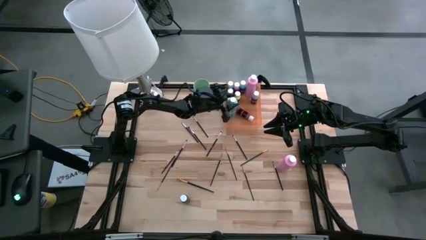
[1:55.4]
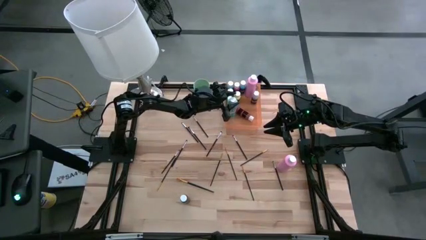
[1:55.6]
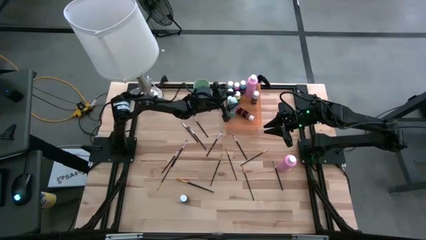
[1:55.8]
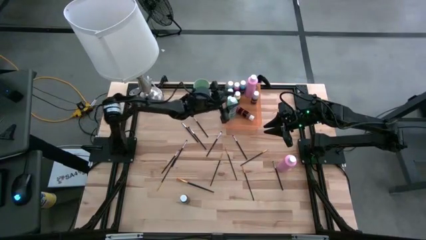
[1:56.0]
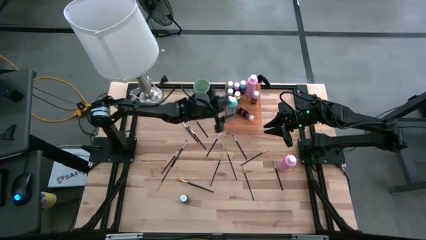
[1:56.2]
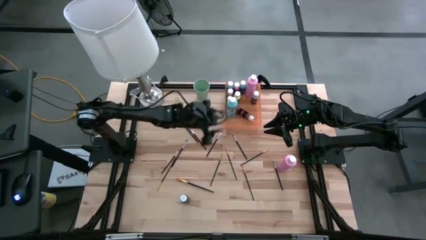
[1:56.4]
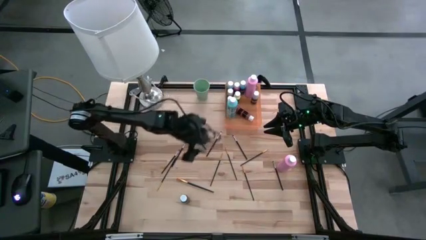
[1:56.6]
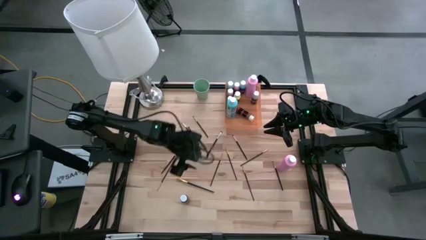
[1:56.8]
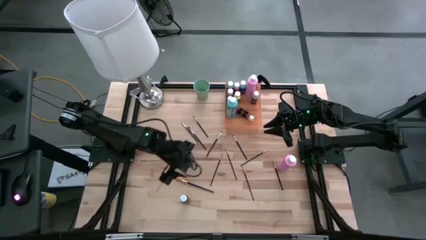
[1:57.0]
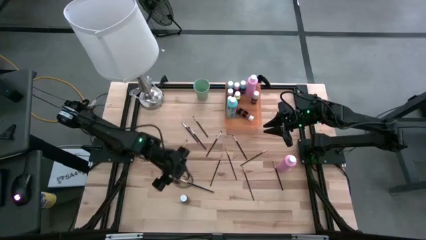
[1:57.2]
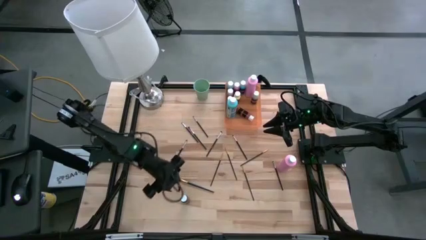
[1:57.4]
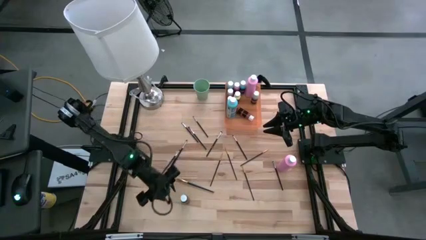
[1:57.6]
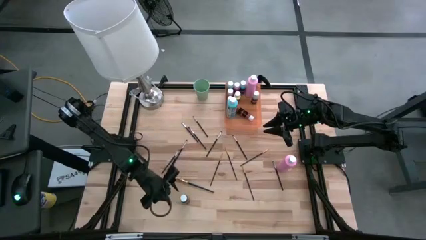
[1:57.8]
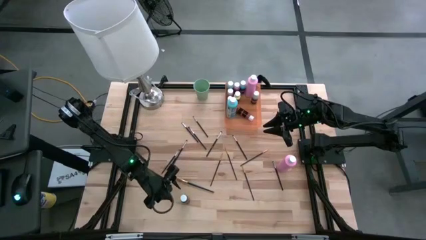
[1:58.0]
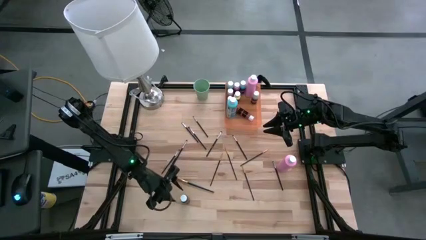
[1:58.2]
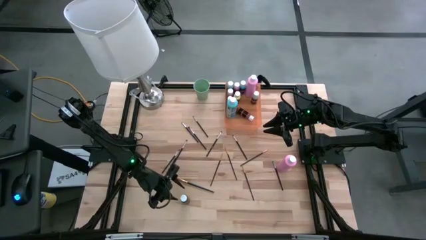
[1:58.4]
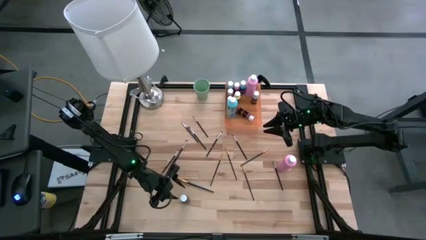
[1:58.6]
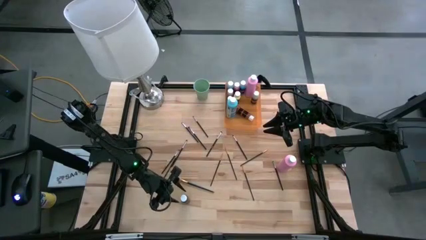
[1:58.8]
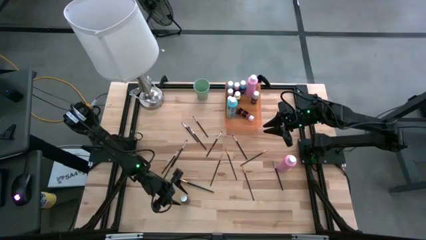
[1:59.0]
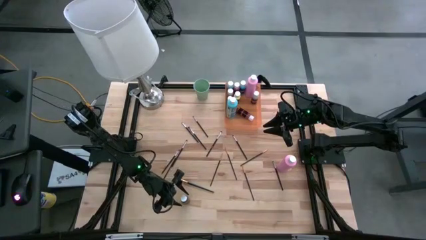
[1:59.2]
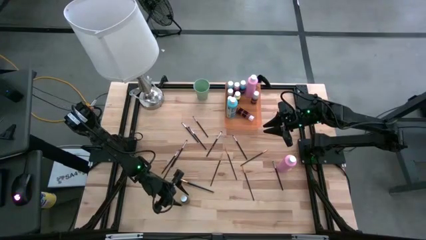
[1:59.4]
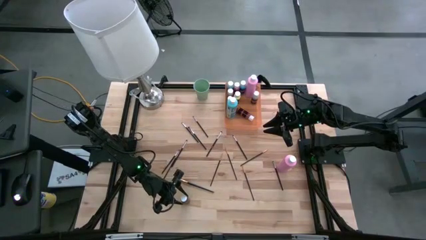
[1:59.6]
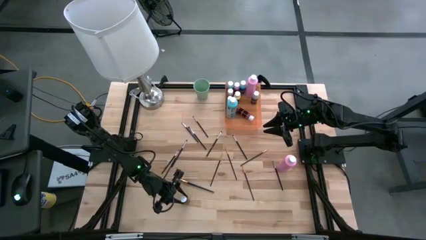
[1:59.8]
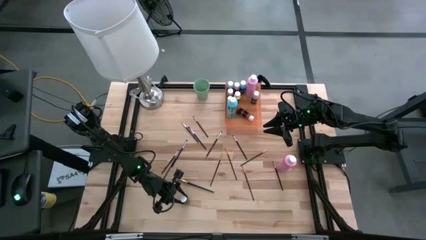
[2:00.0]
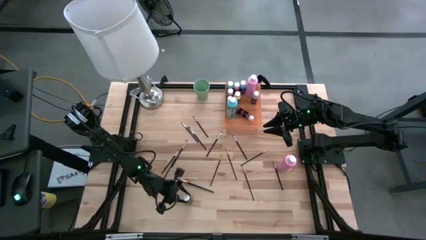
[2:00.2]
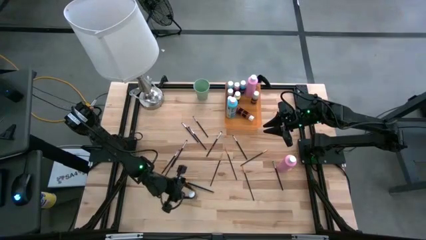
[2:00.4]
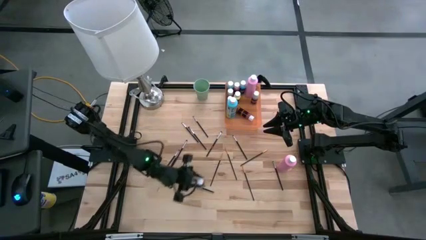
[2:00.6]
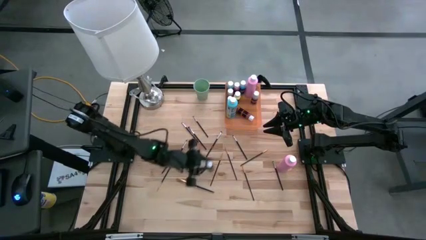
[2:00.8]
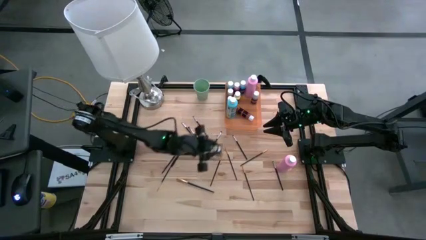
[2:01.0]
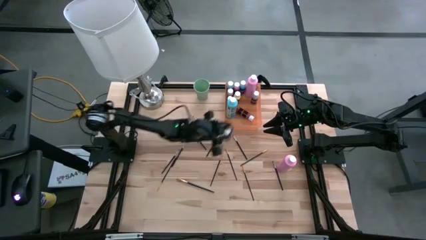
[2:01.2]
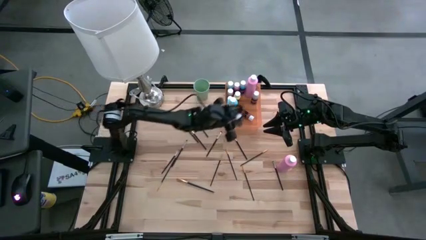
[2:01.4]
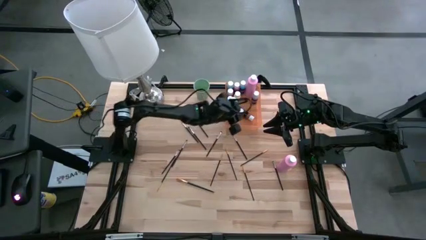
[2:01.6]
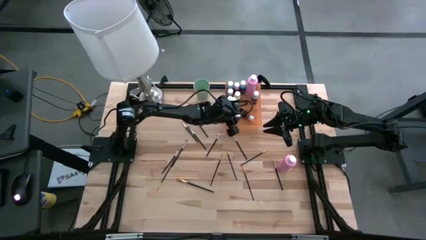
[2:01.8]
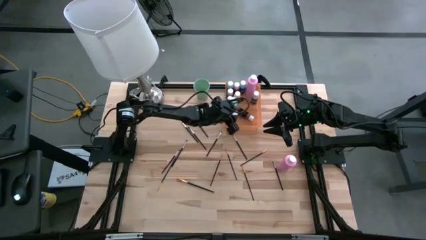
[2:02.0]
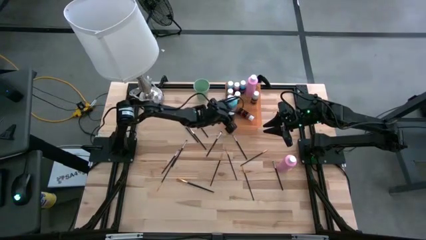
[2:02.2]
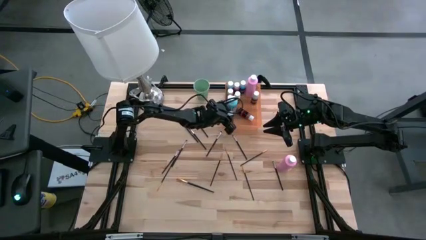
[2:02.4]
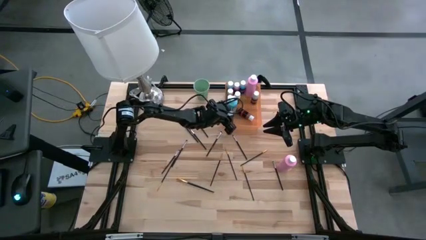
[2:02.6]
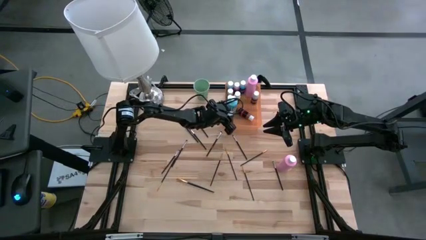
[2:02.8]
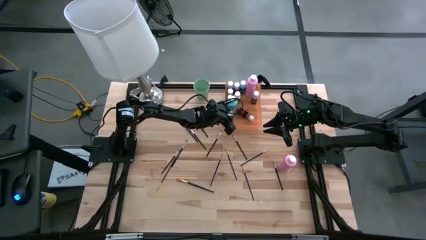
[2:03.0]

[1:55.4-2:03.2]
Task: Pick & Place Paint Supplies
Put the black paint bottle into the orange bin

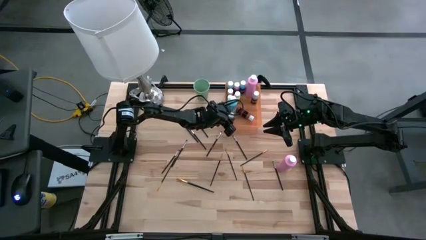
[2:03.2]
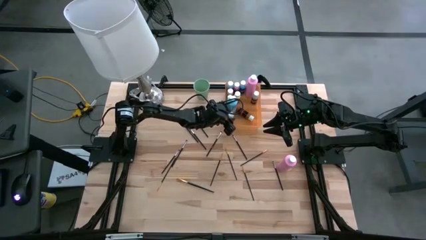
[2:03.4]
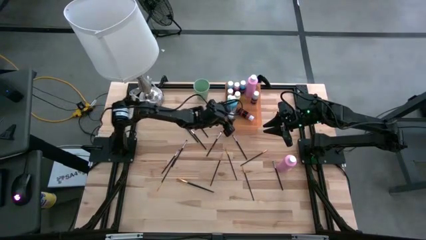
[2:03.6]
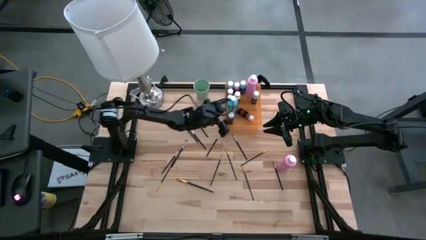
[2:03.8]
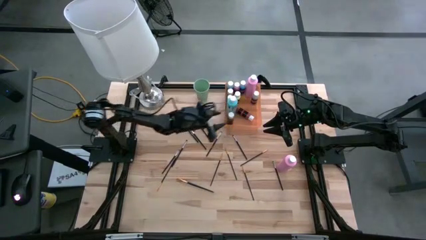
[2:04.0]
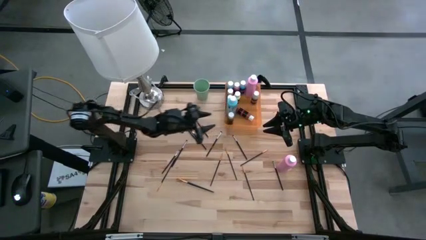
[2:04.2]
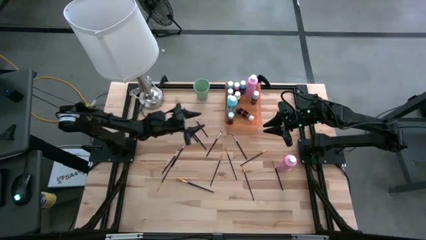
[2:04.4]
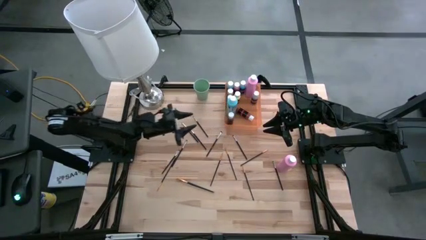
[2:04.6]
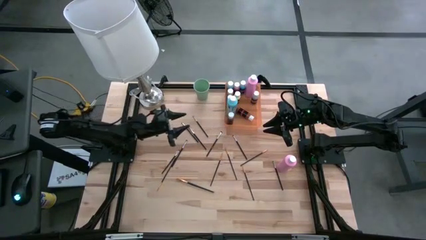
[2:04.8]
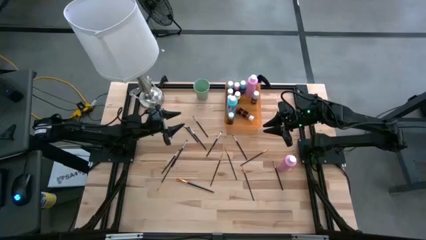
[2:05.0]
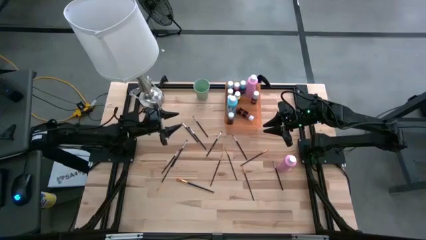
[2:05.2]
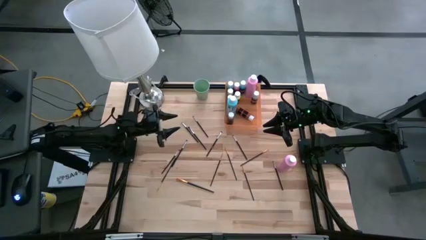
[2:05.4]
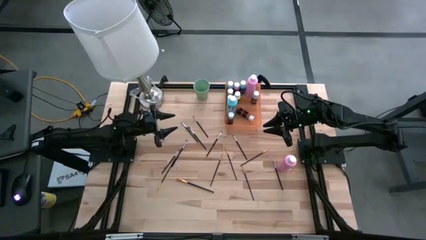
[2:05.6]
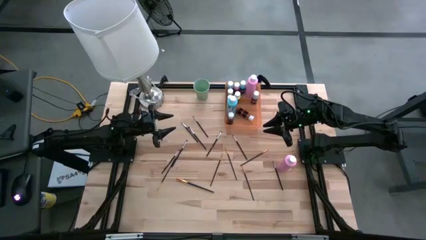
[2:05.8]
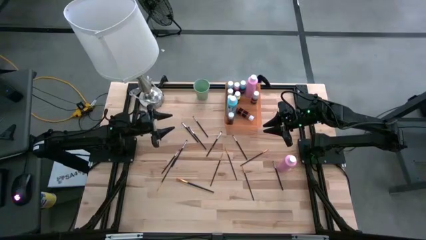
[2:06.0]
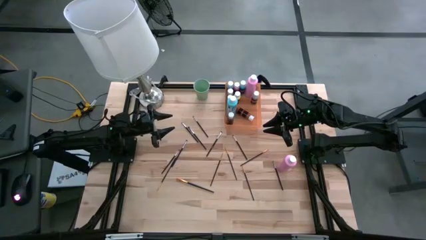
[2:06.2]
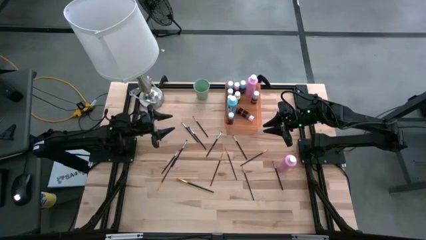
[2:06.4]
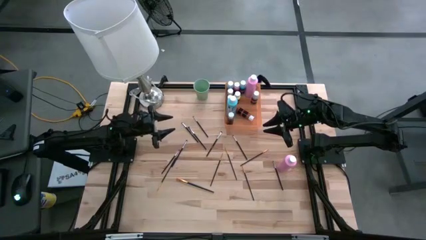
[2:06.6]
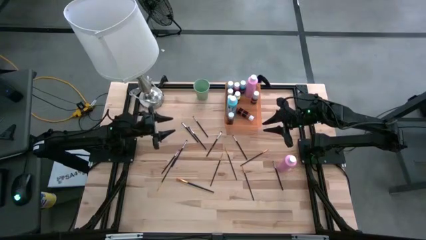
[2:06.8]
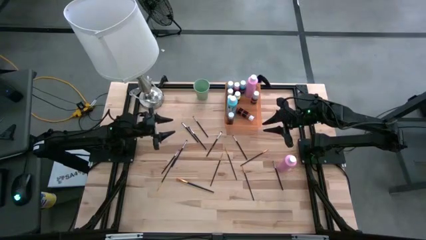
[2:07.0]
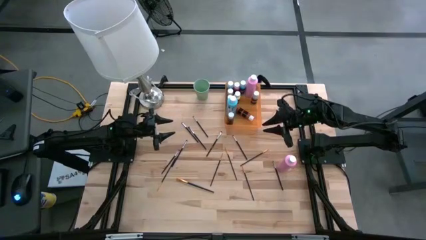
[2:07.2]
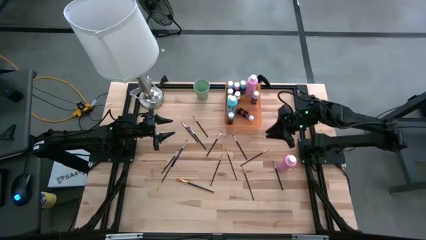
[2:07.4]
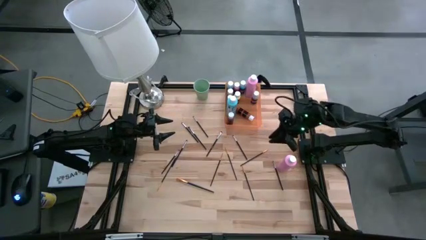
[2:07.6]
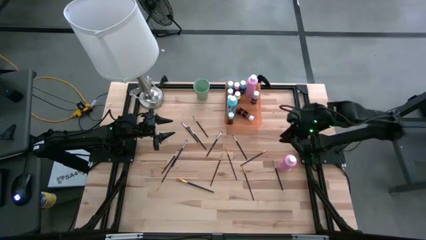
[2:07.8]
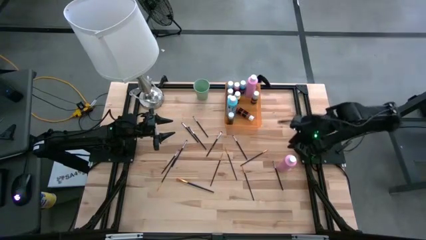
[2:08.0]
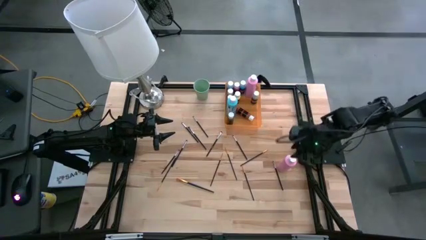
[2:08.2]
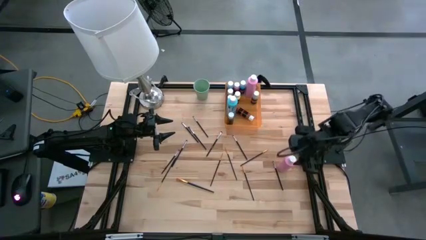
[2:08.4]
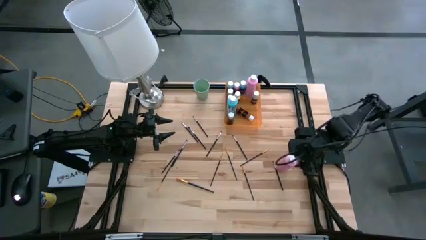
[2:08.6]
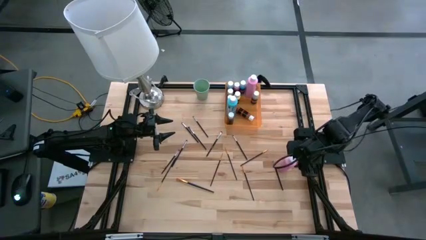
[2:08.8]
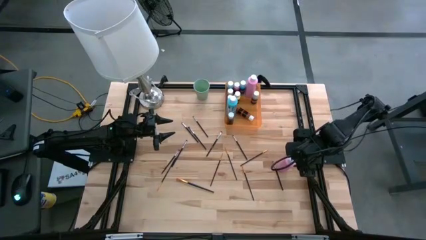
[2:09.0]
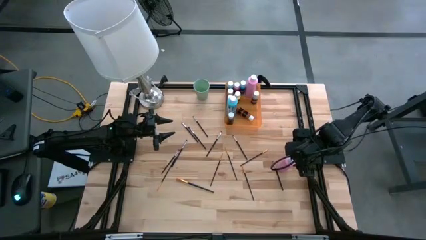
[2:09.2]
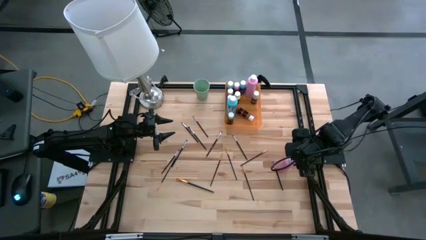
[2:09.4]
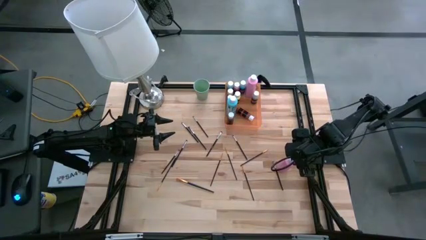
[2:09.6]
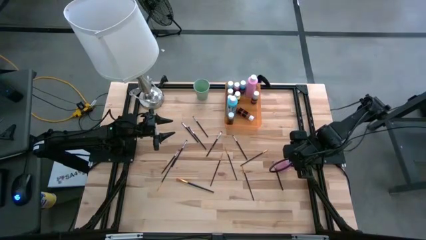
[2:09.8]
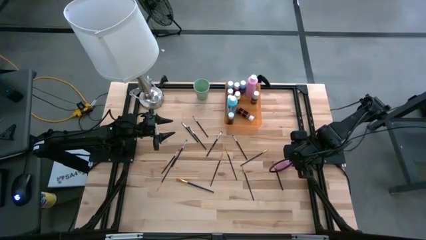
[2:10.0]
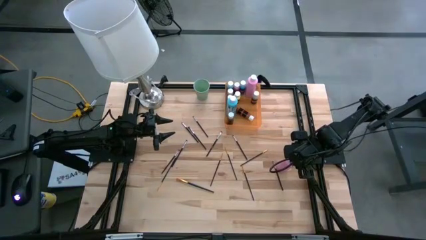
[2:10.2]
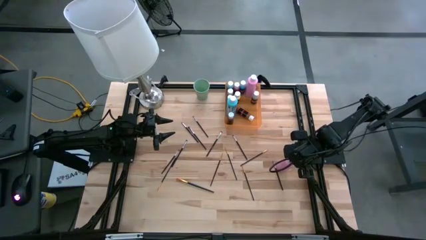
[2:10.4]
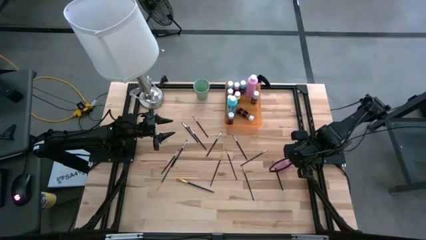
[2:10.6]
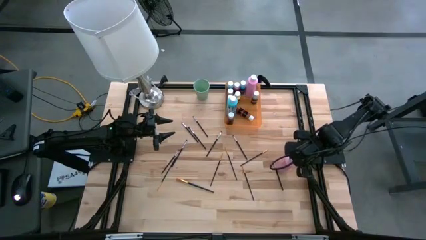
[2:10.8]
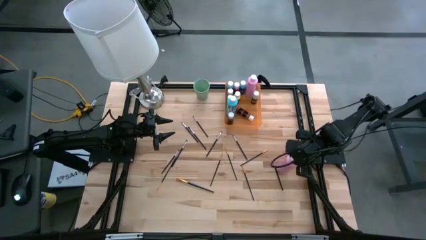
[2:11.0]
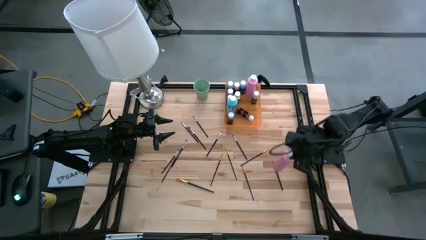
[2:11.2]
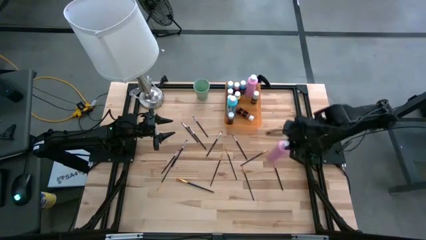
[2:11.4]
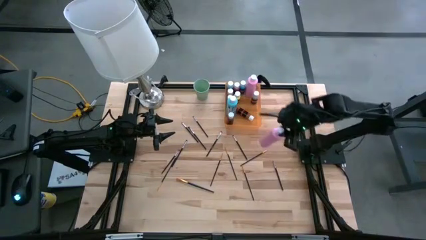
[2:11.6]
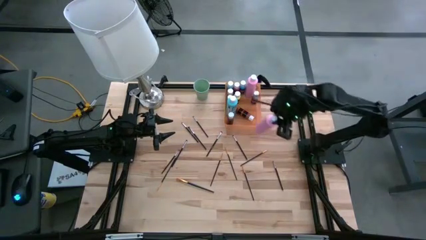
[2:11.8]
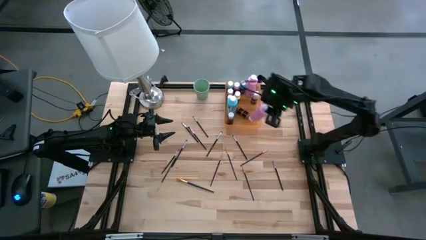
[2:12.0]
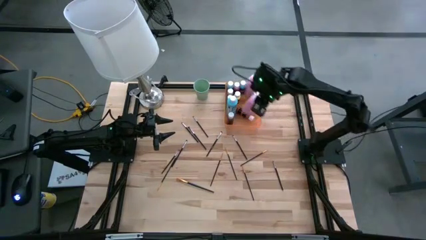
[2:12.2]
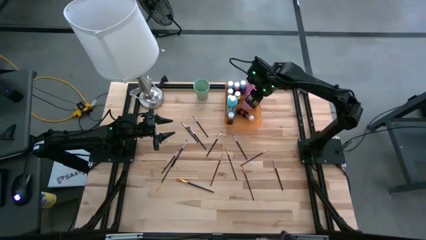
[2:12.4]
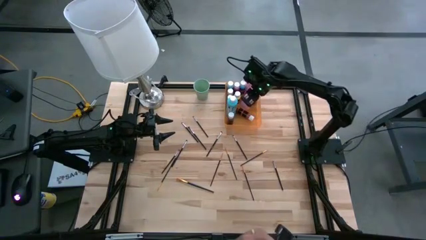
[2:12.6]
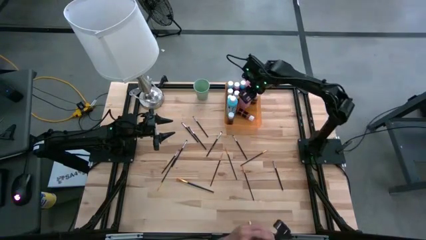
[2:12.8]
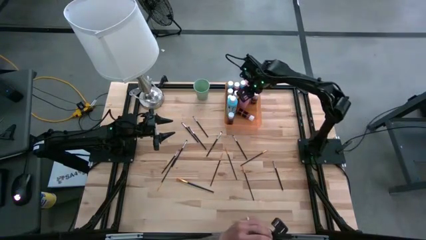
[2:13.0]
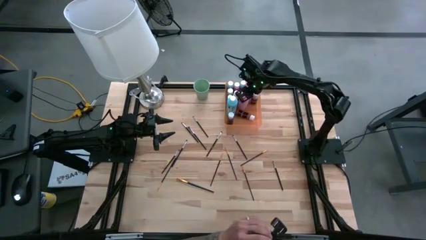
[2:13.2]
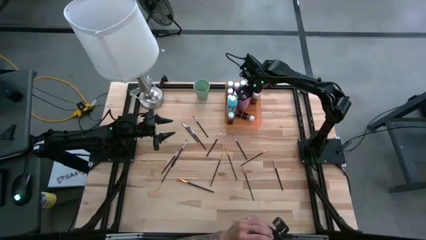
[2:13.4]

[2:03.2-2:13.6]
Put the large pink paint bottle into the orange bin
